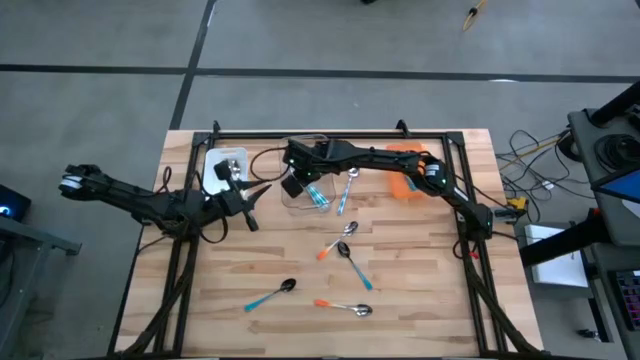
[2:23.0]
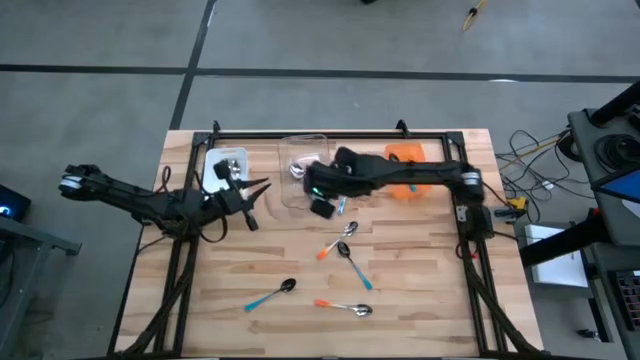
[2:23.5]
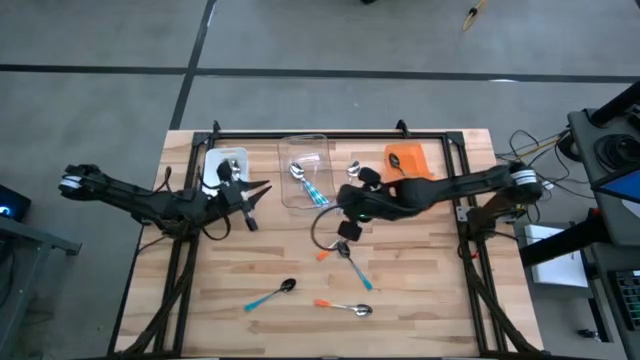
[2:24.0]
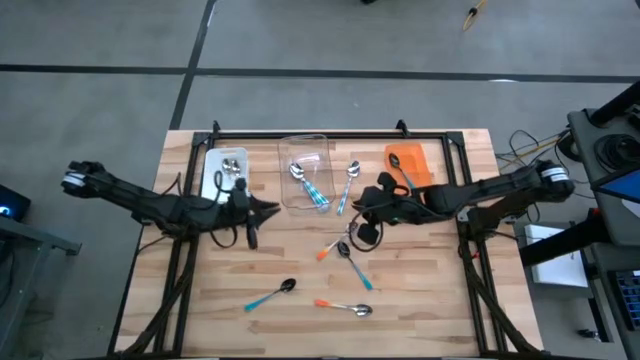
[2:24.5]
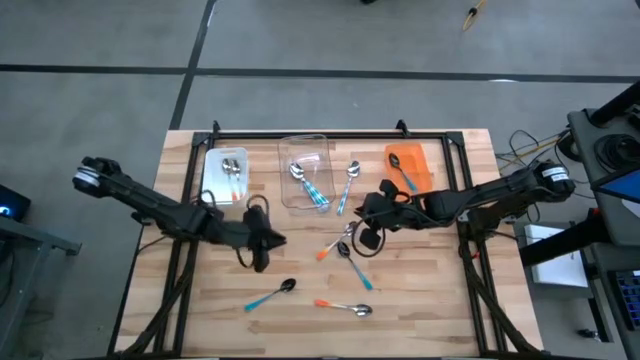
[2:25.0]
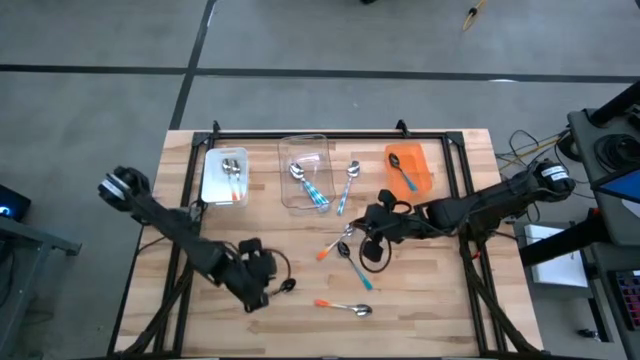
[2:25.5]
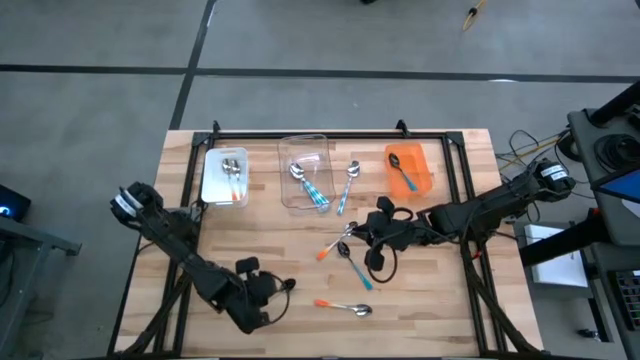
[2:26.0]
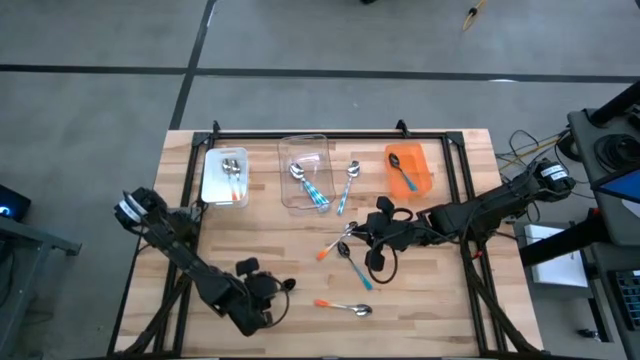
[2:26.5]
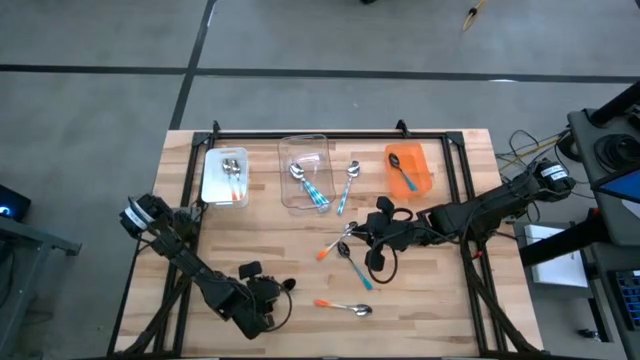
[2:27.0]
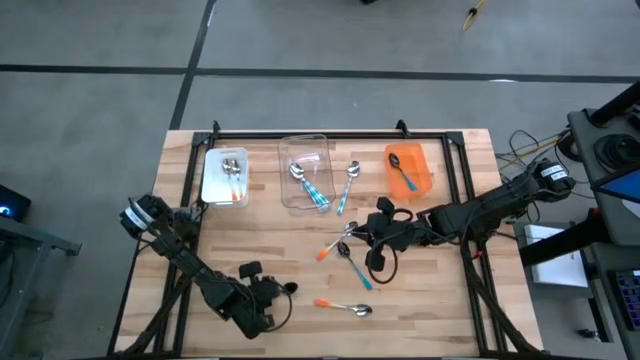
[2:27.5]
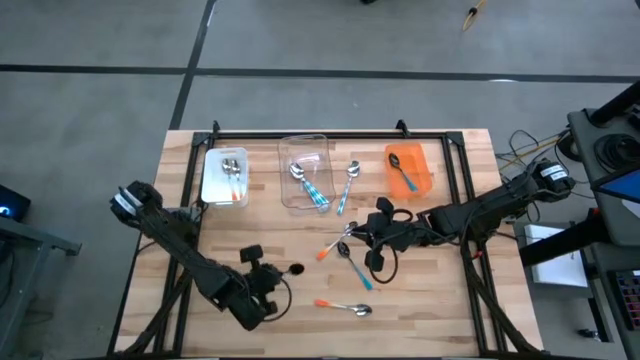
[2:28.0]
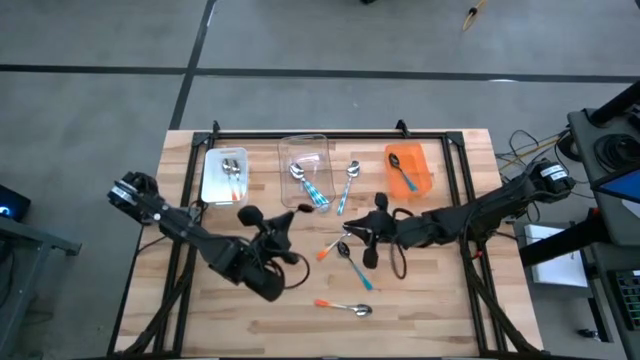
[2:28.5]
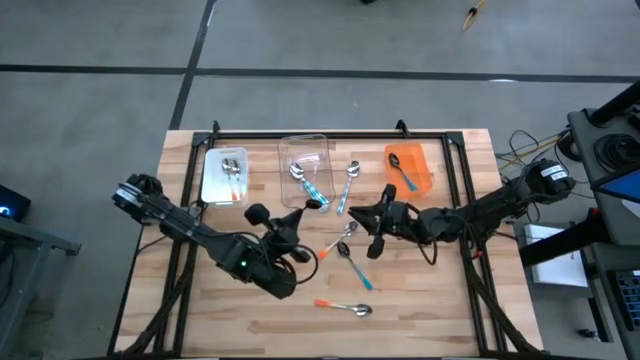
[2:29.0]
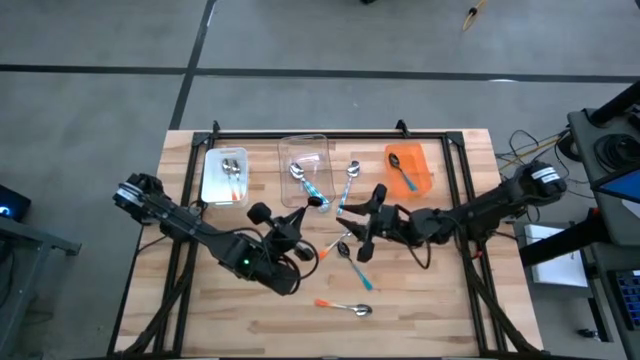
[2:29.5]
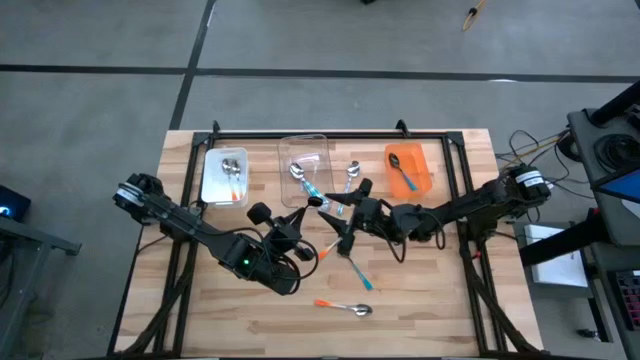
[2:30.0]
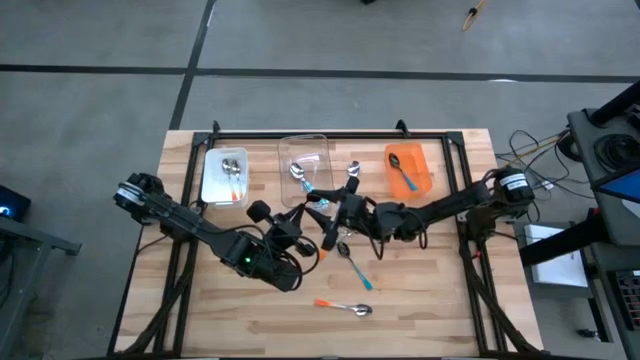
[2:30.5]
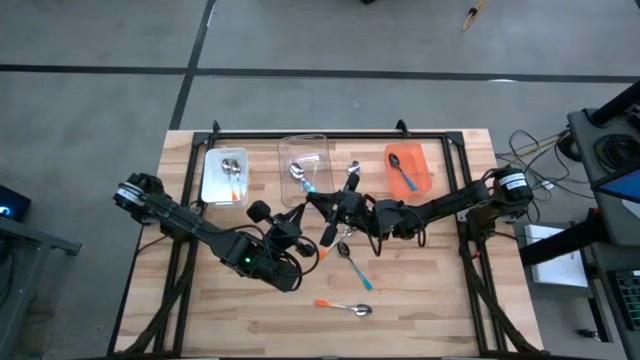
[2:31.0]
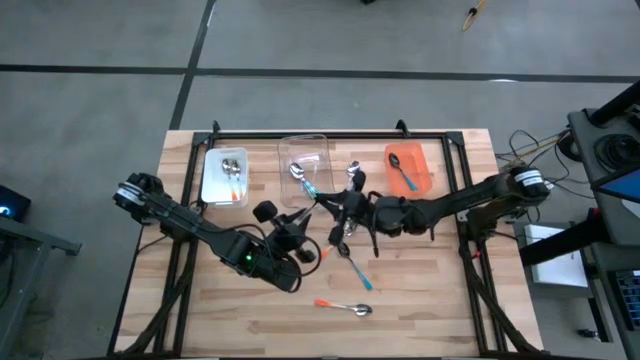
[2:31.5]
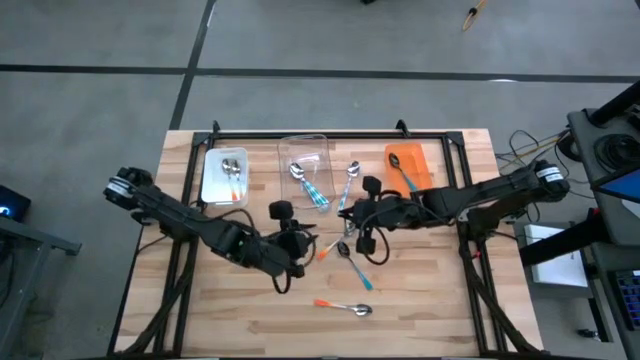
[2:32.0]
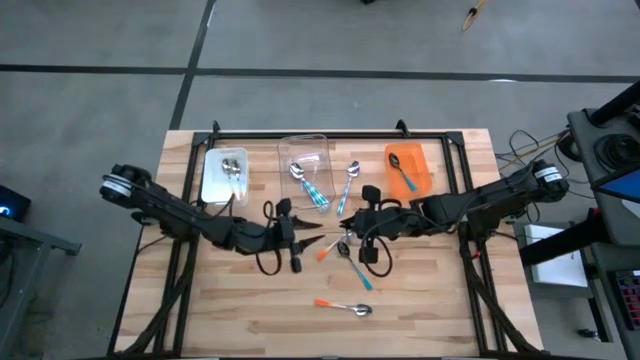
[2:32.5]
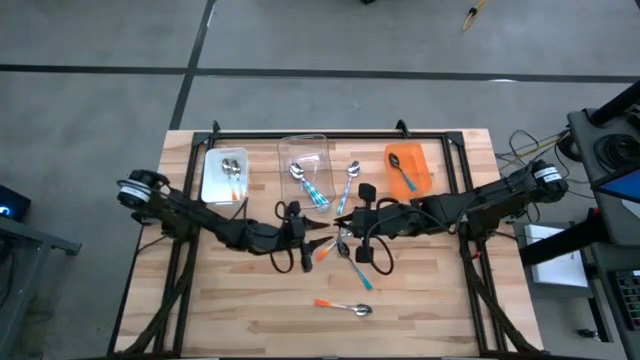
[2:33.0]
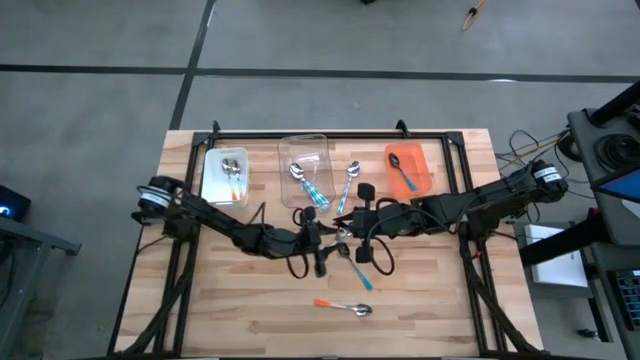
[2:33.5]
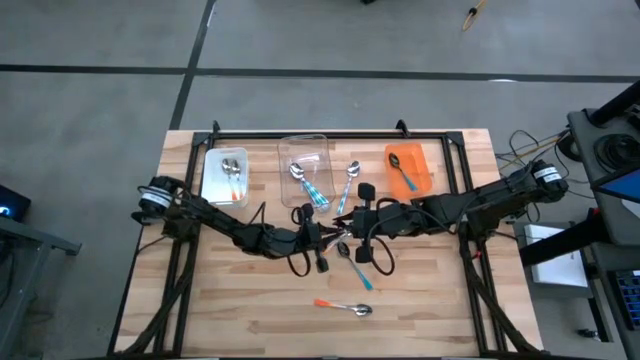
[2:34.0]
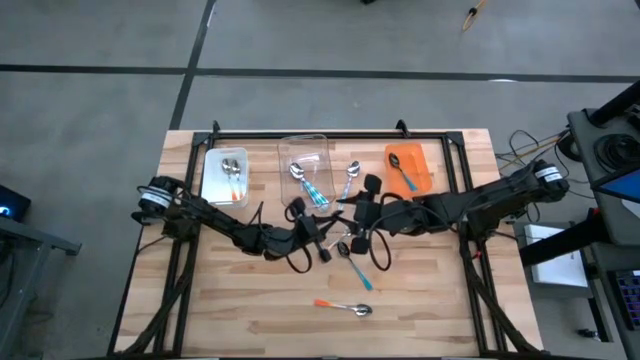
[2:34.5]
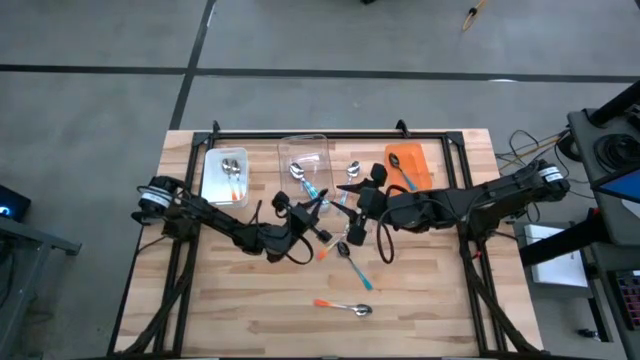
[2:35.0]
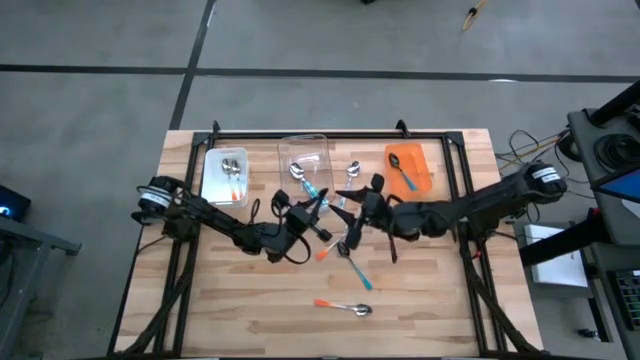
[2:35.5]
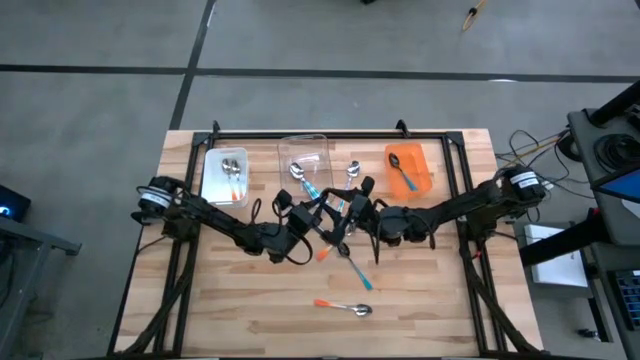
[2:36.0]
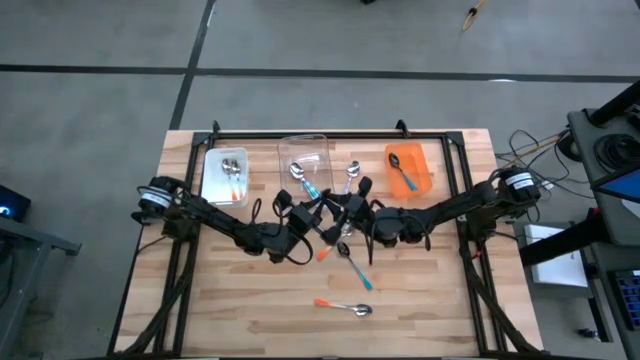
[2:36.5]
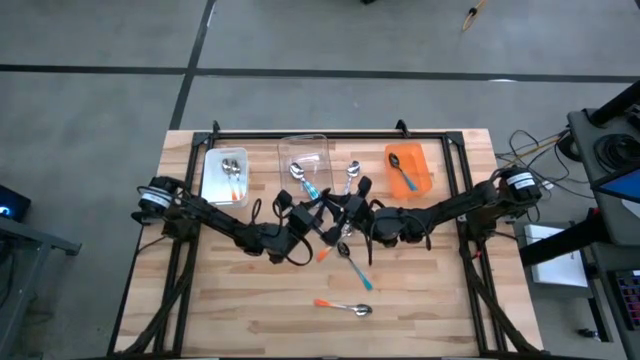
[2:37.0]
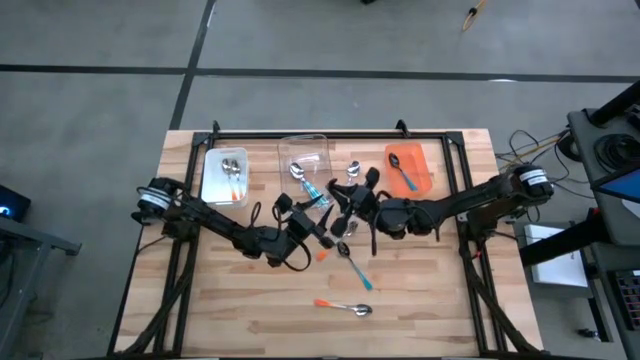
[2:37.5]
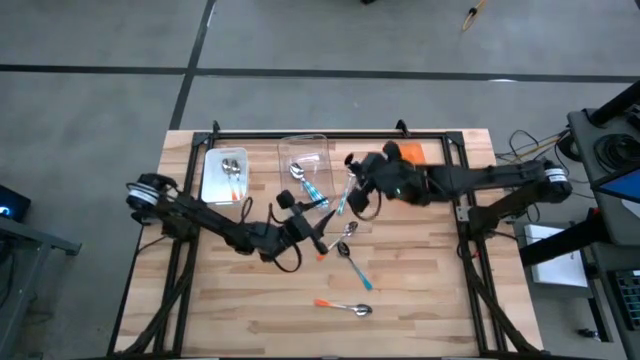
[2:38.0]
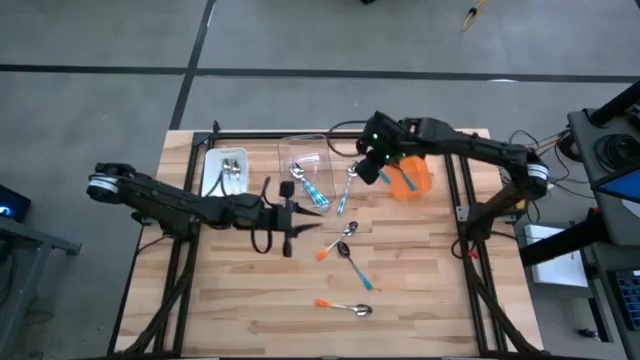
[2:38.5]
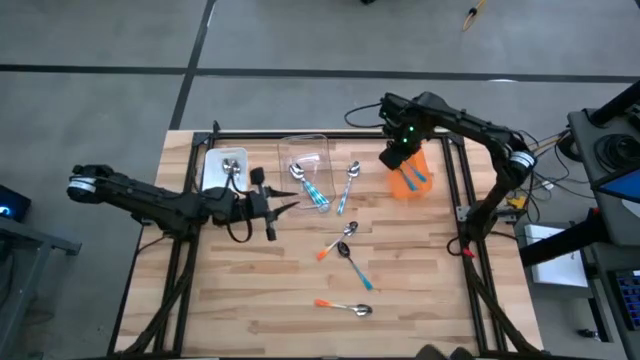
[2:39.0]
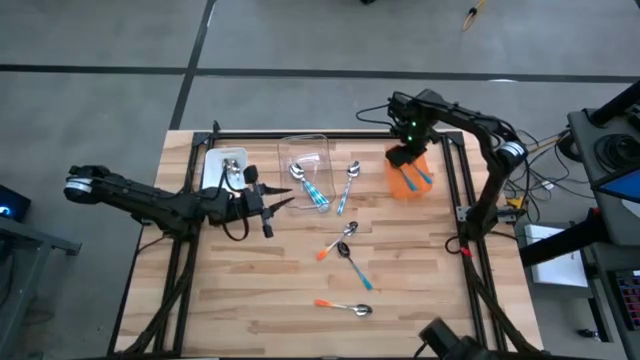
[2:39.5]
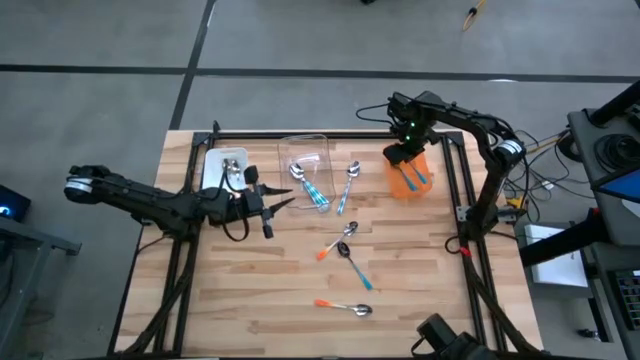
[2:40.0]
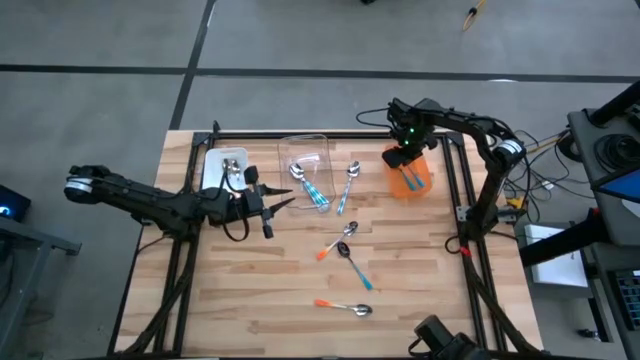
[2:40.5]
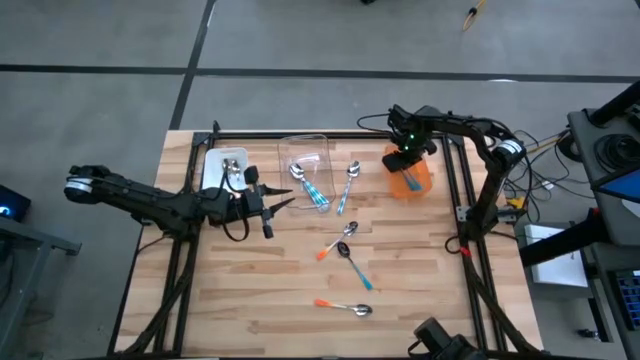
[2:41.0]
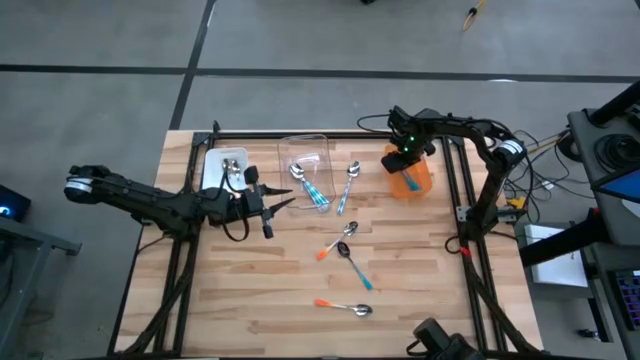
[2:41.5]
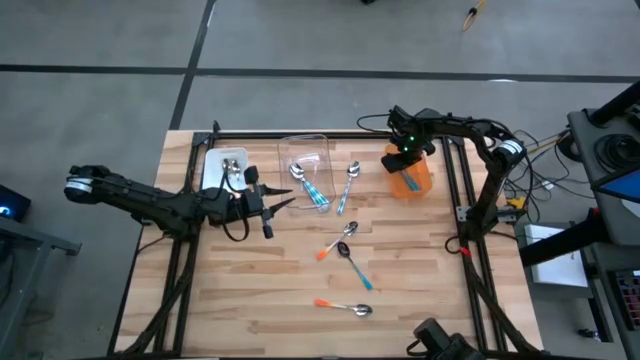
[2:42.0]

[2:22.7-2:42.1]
Task: Sort silverware by color (type)
Put the blue spoon into the orange bin

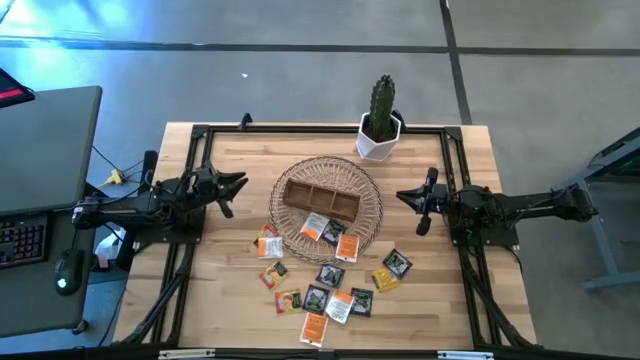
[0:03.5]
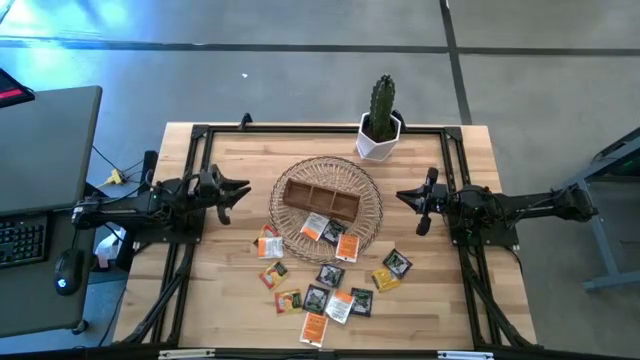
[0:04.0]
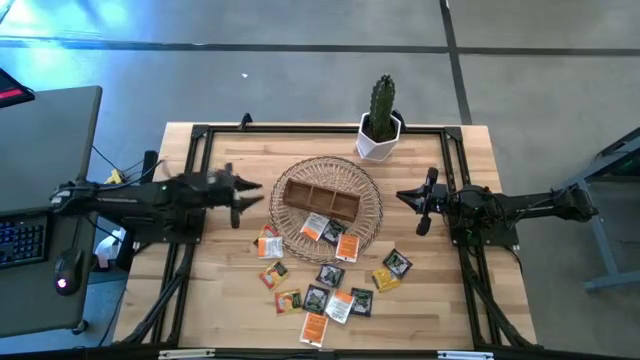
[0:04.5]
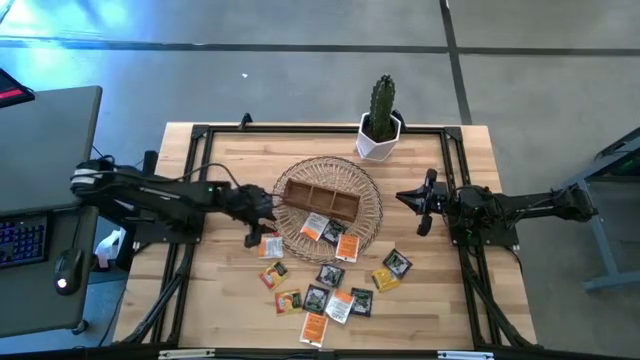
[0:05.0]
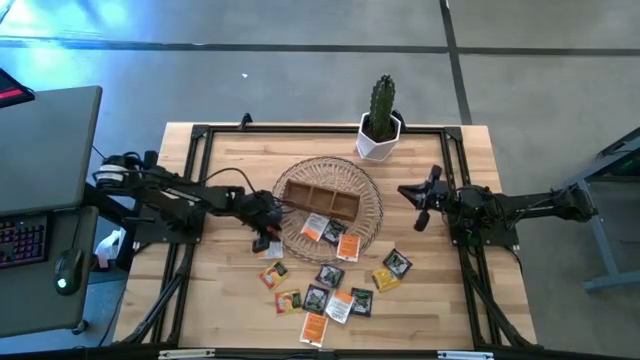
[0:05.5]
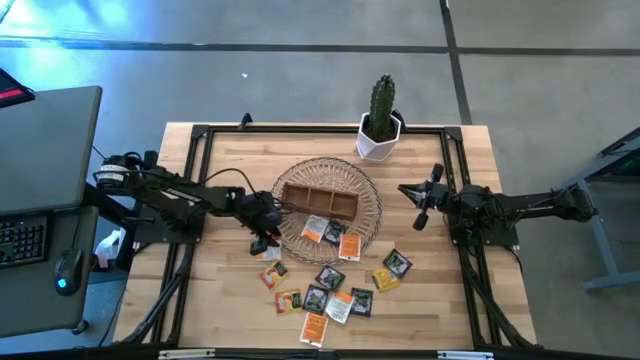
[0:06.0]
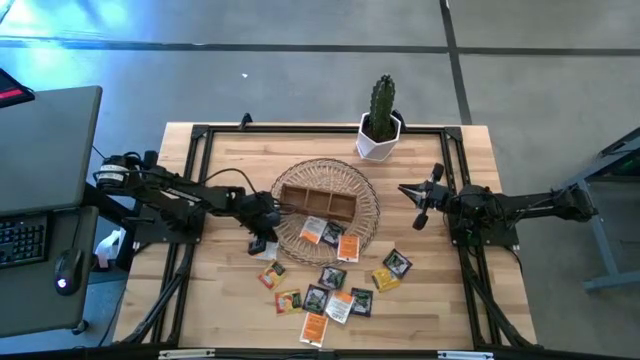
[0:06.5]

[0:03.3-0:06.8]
Task: Pick & Place Tea
Put the orange tea pack into the left section of the wooden organizer
